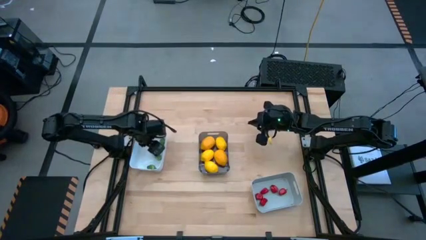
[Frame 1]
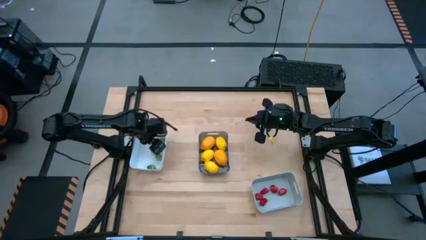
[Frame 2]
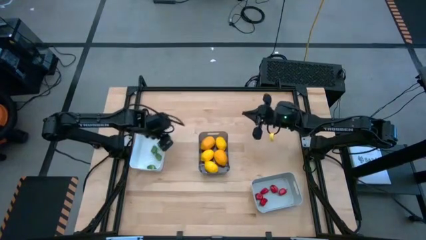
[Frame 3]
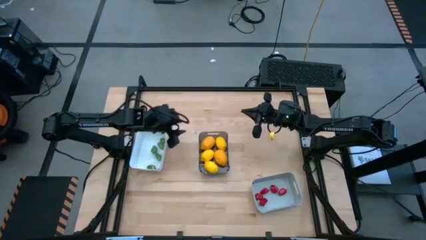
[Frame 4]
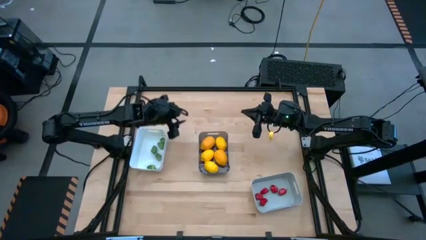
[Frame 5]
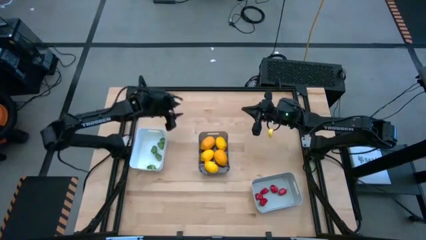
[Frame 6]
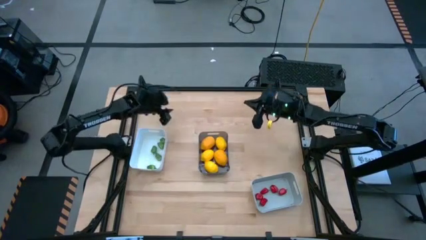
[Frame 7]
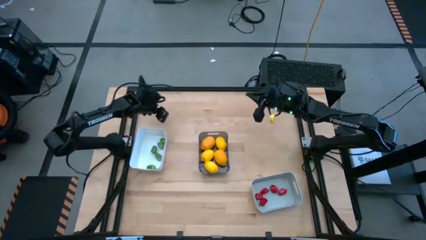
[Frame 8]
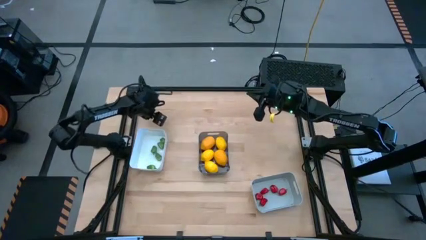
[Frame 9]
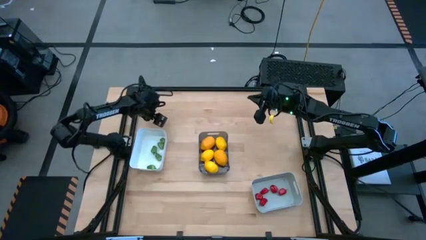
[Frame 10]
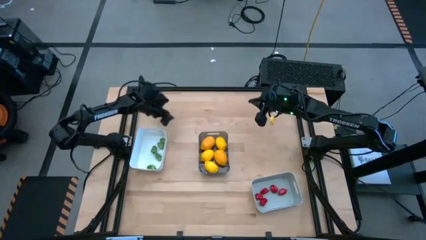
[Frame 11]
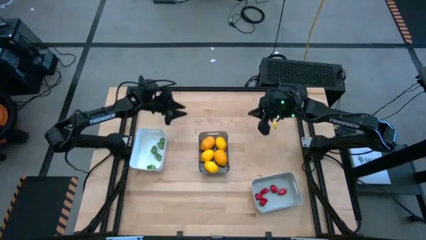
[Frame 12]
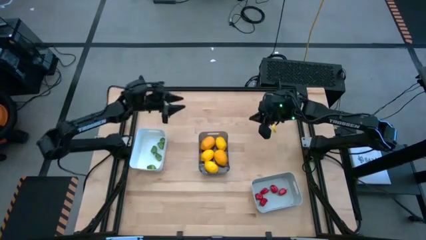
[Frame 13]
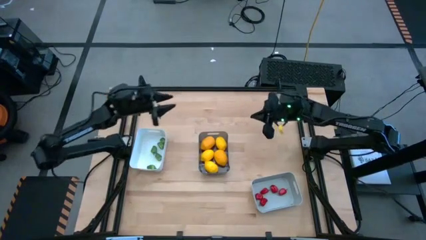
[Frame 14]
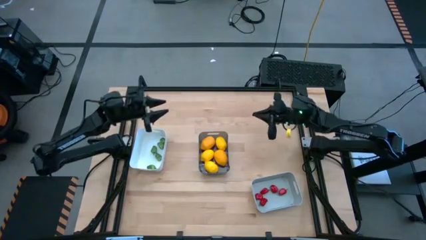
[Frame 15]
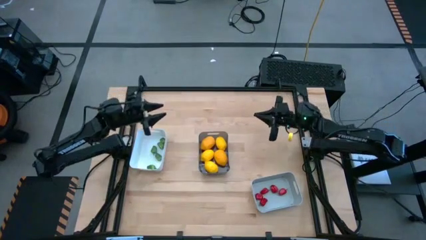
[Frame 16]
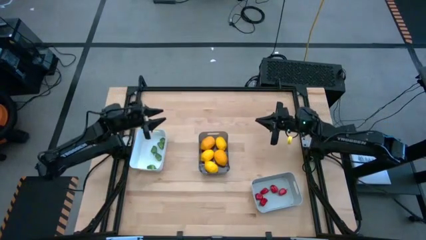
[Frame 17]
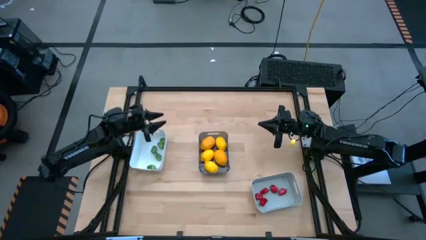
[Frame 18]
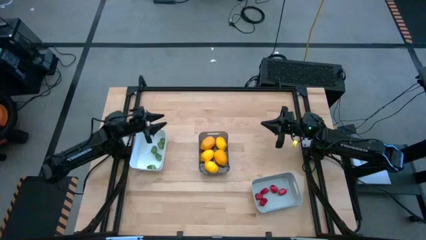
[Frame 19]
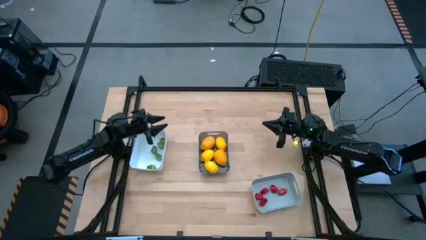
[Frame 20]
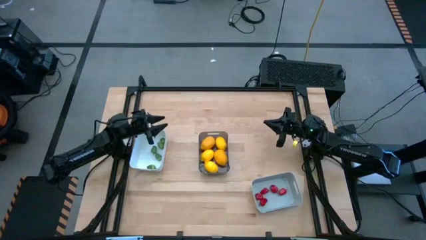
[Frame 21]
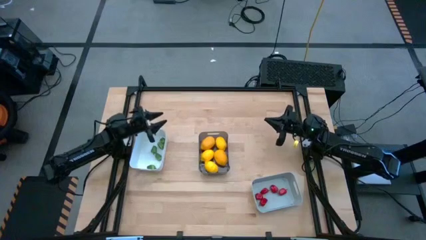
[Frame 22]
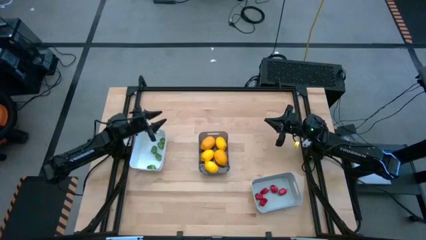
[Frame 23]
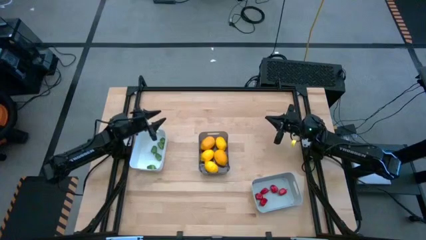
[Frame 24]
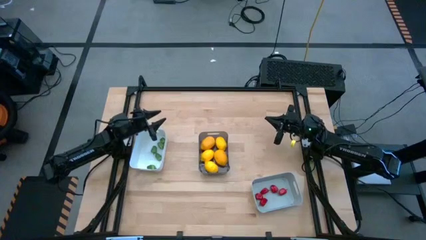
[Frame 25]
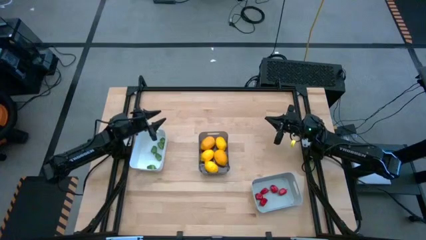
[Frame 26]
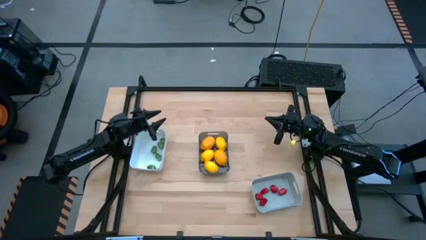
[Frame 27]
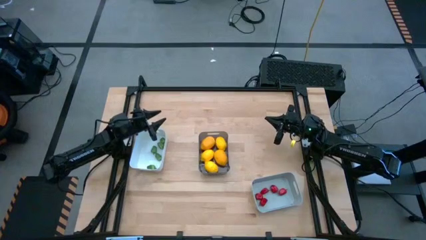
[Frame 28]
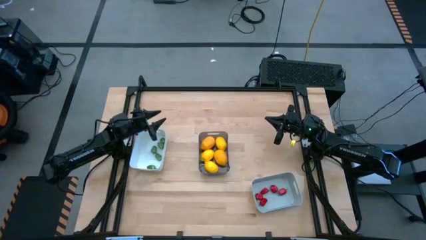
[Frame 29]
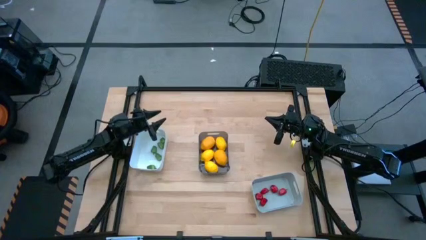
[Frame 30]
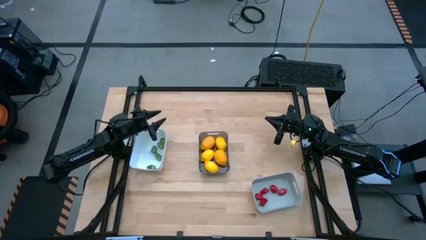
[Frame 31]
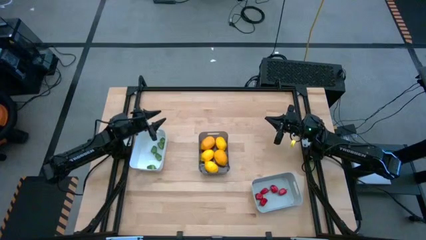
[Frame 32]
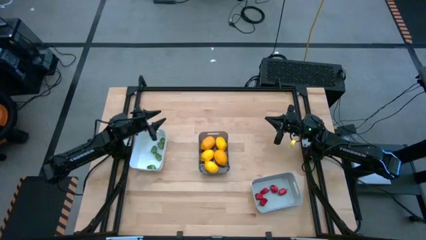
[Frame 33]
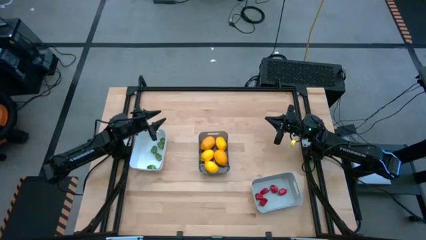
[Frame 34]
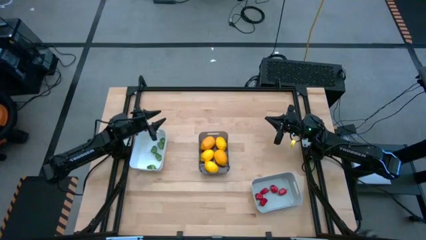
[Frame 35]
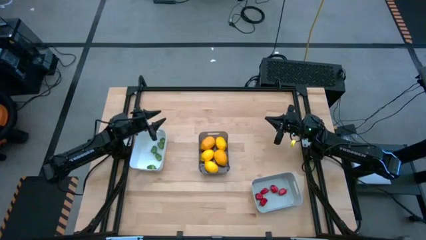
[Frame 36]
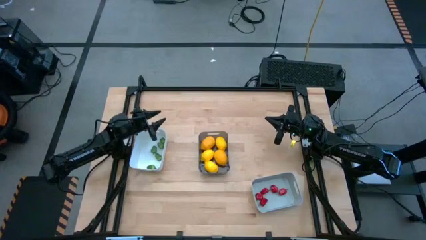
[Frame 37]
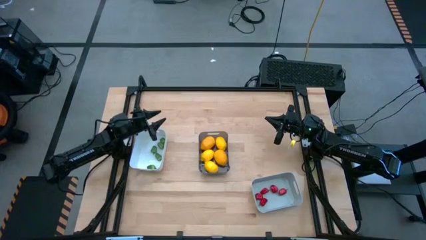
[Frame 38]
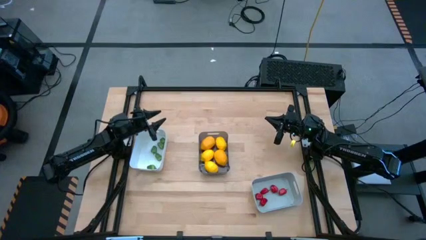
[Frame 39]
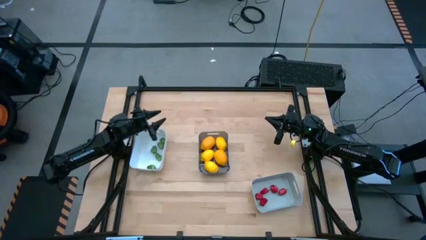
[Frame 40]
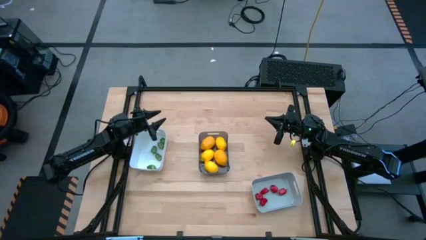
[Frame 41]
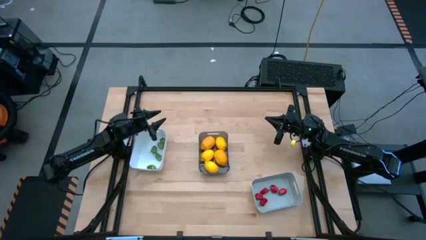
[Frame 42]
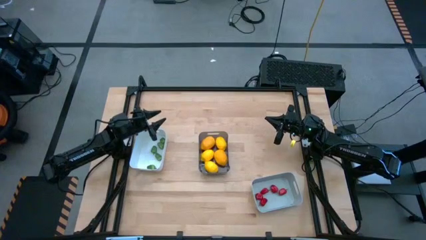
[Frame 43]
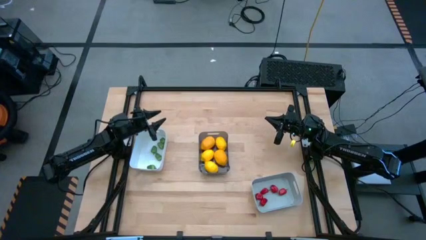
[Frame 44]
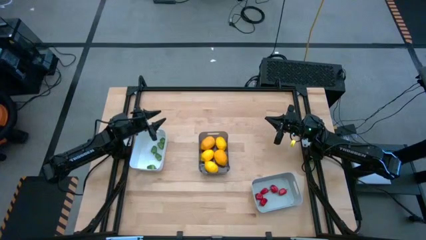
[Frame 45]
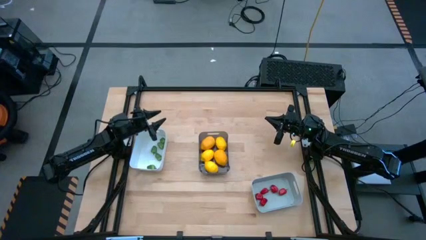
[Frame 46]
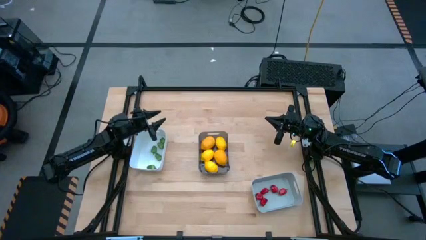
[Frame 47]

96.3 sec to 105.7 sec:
Task: Sort produce into baskets
Return to Home Position

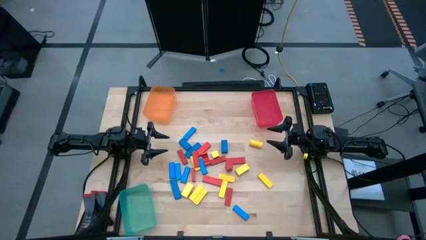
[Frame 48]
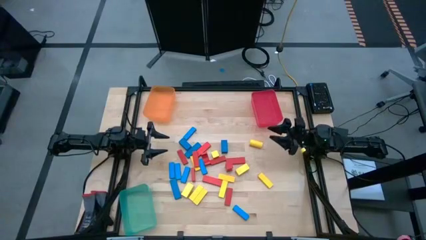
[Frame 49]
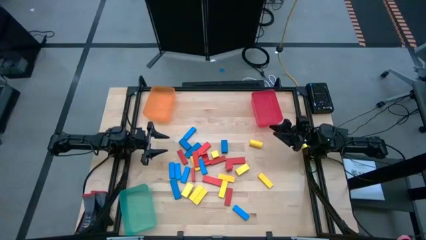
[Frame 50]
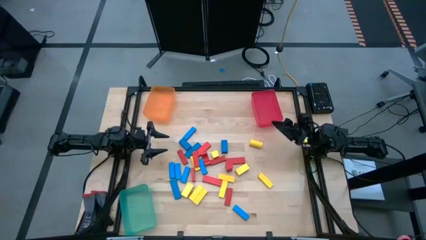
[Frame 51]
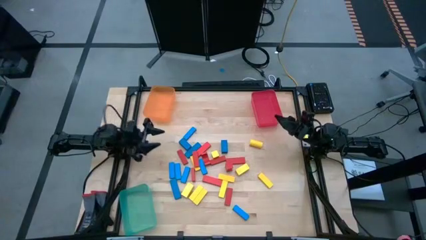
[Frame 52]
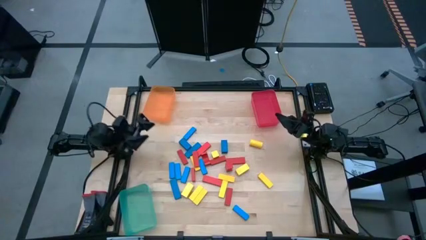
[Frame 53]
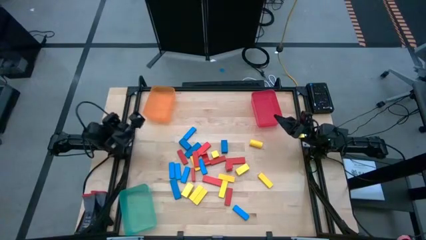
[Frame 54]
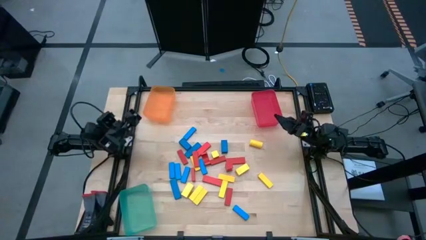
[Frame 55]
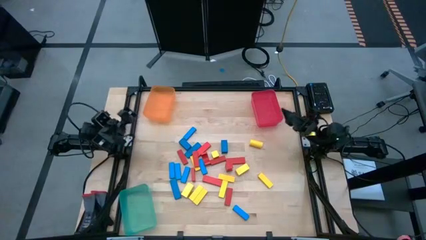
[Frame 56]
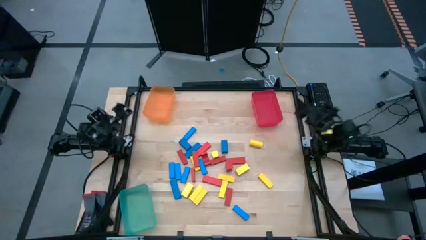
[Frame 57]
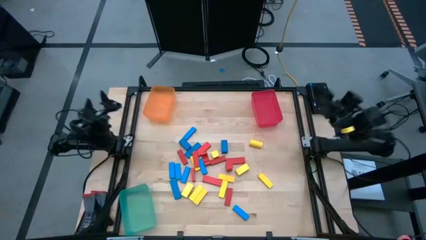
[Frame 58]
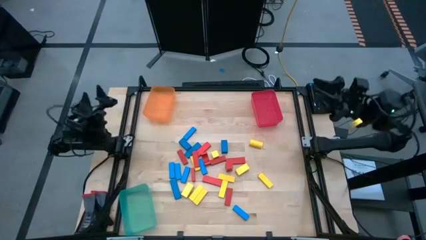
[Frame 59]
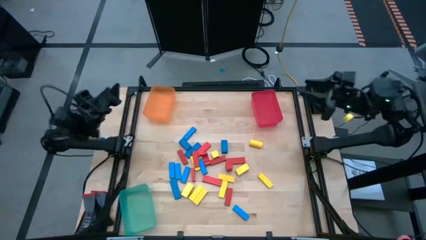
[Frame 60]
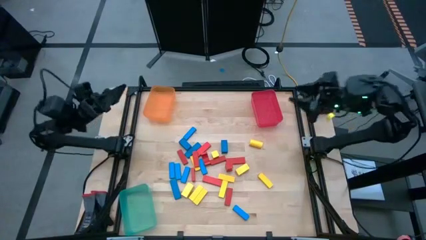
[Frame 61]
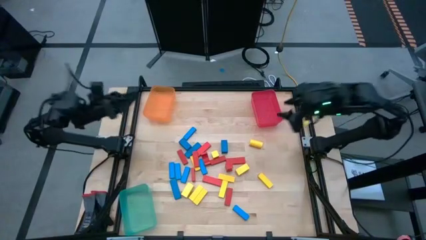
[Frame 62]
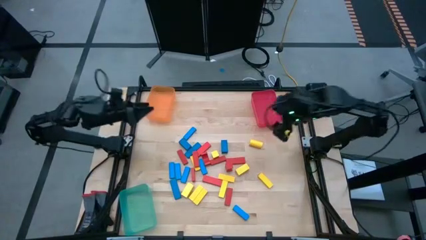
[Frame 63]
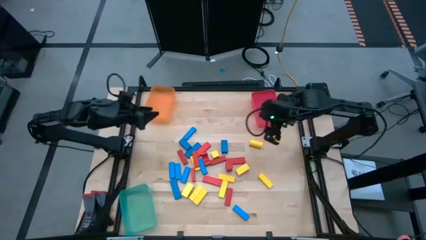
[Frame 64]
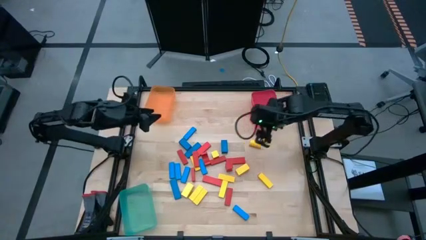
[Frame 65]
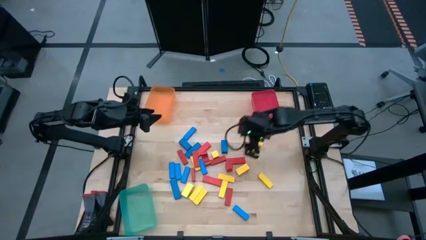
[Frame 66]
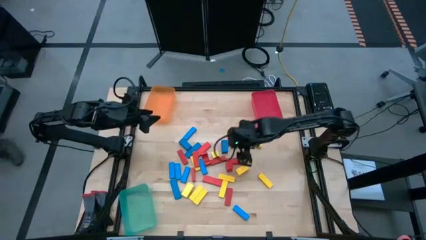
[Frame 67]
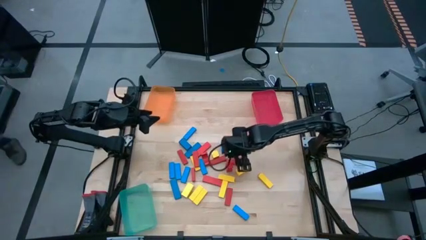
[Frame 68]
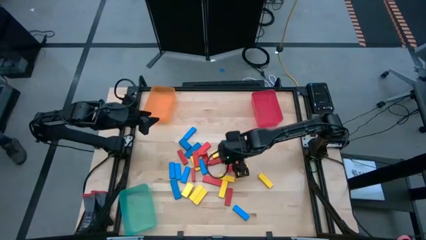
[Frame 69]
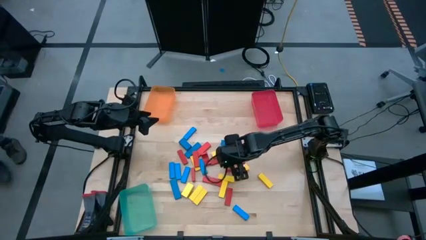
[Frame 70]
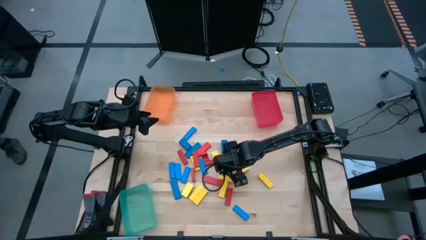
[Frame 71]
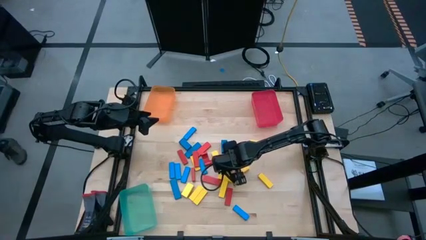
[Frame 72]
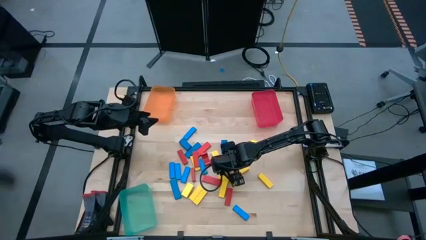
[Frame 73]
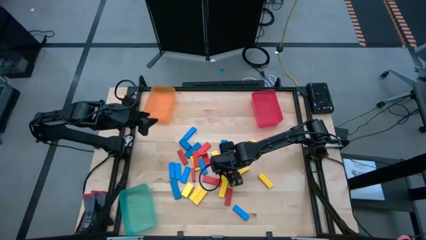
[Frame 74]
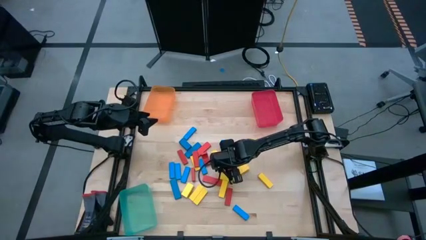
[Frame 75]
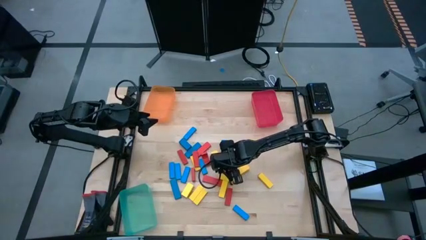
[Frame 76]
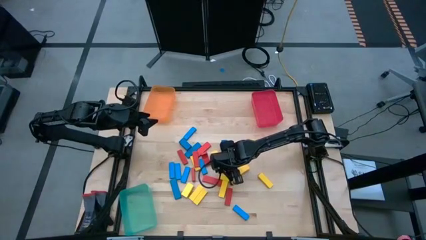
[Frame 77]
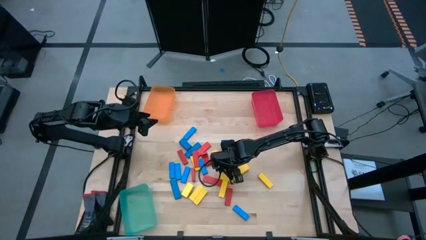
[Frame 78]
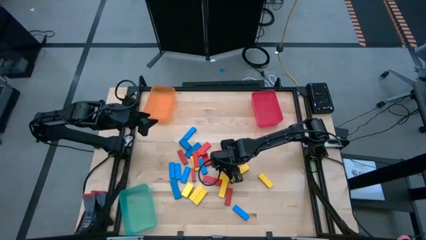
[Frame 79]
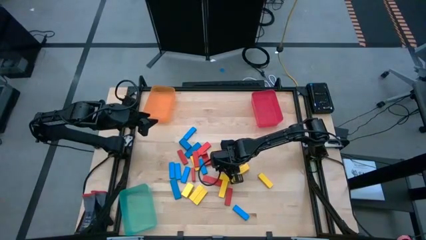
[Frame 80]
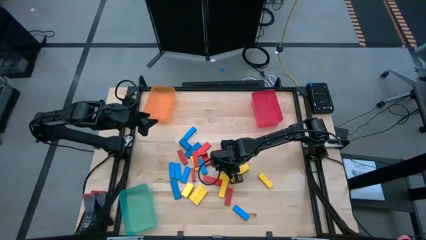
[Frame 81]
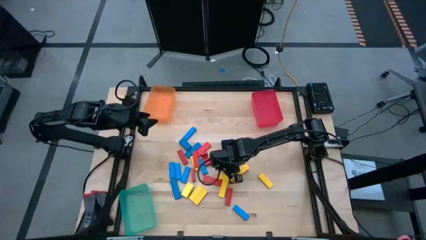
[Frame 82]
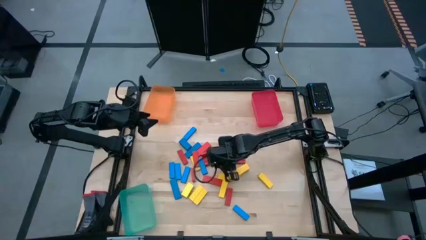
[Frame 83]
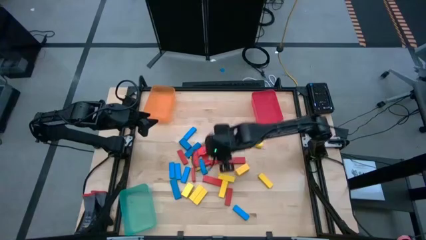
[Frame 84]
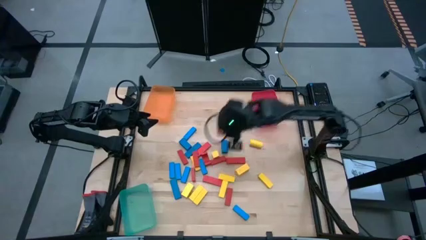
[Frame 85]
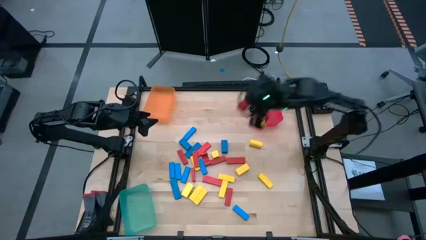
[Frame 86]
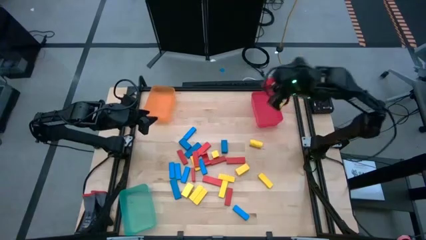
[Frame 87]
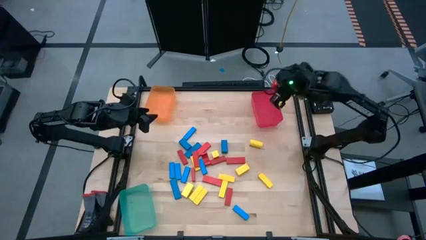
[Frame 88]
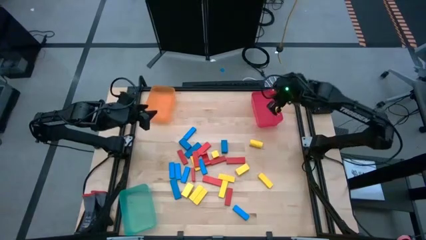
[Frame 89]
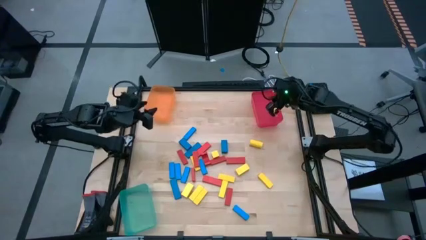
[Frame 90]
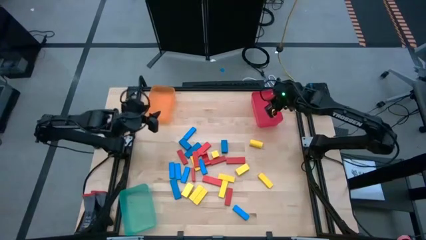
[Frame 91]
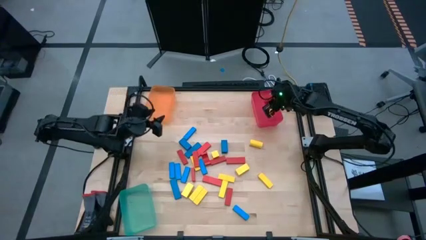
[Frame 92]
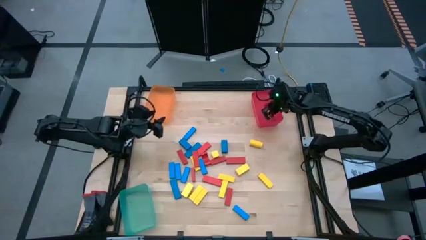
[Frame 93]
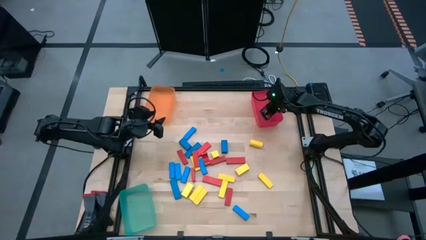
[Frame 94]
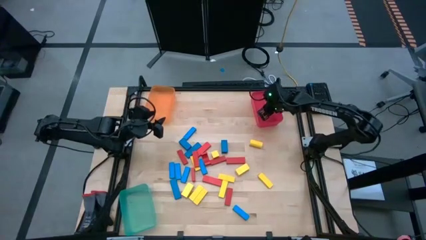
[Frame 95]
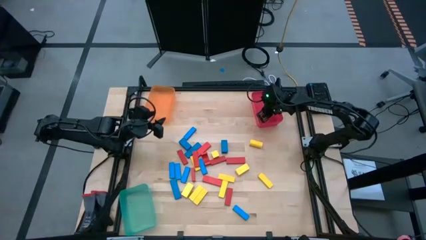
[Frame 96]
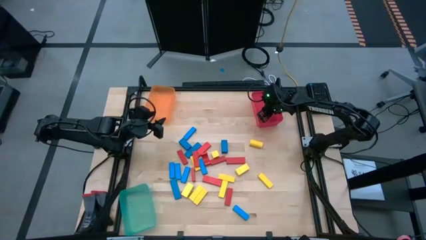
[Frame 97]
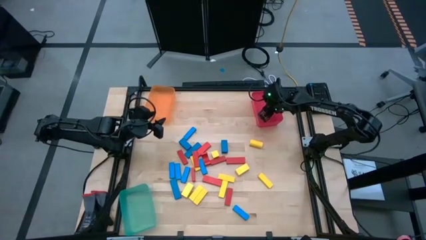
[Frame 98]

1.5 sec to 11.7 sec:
Task: Sort blocks
Put the red block into the red transparent bin
